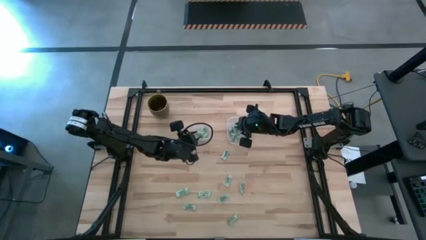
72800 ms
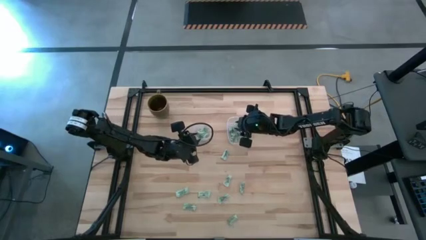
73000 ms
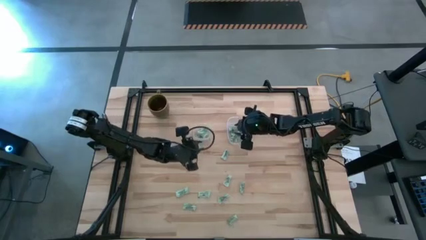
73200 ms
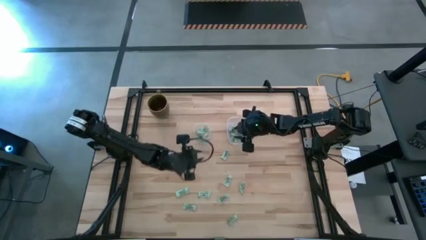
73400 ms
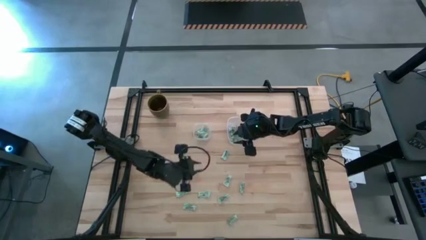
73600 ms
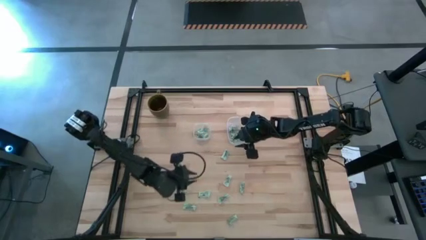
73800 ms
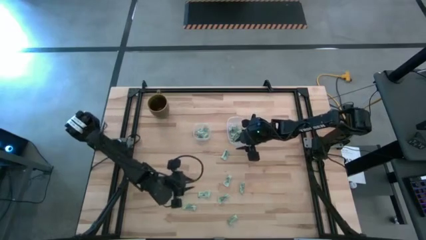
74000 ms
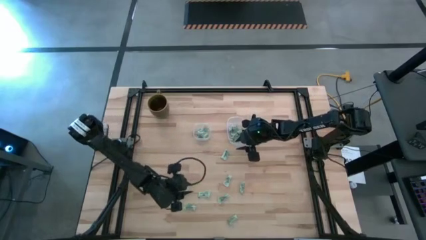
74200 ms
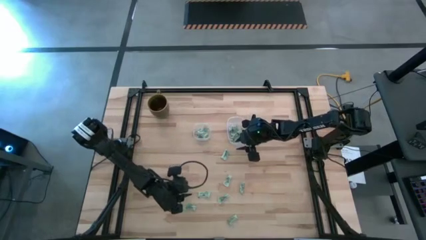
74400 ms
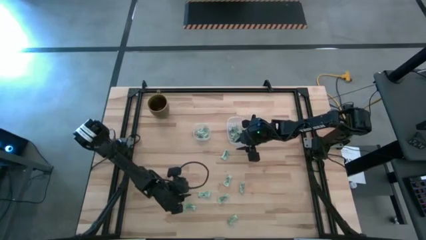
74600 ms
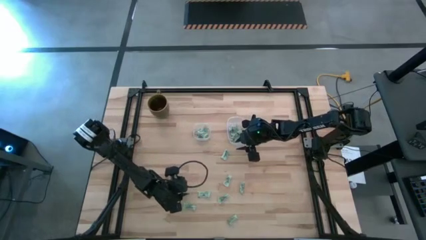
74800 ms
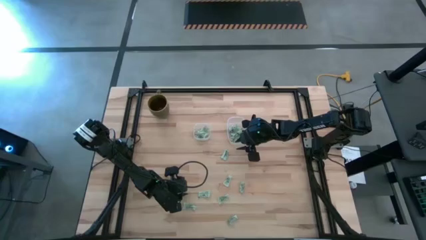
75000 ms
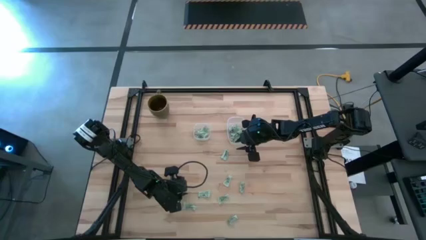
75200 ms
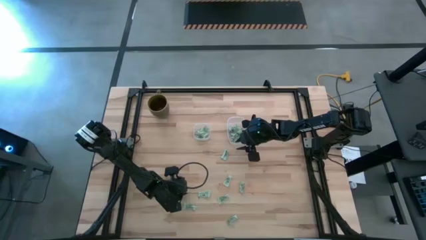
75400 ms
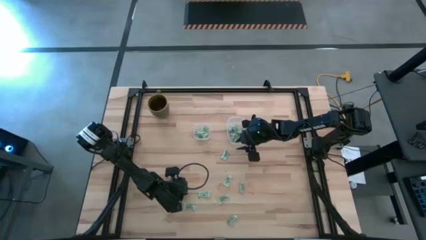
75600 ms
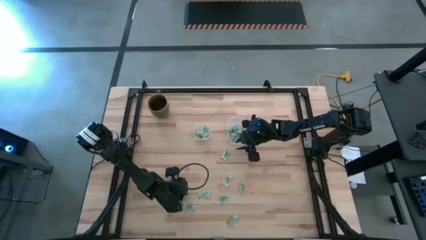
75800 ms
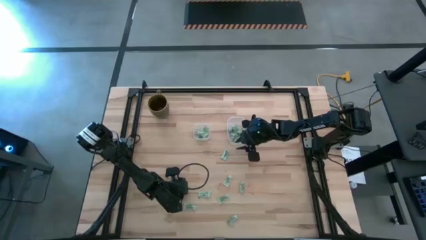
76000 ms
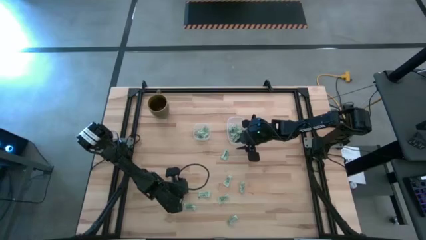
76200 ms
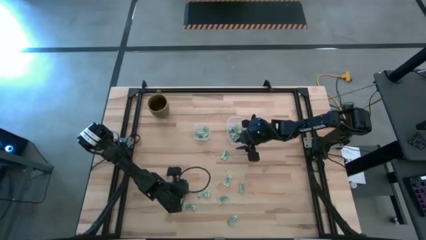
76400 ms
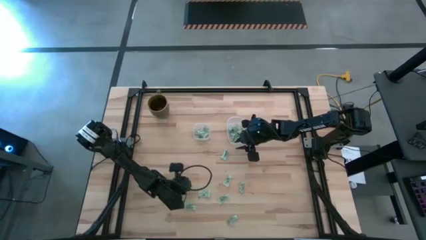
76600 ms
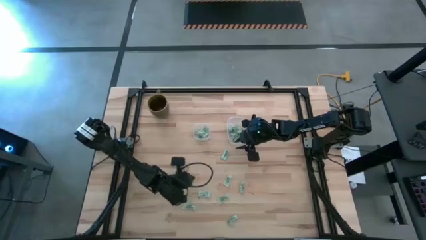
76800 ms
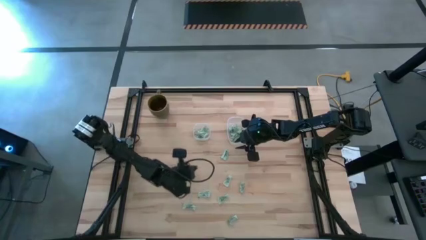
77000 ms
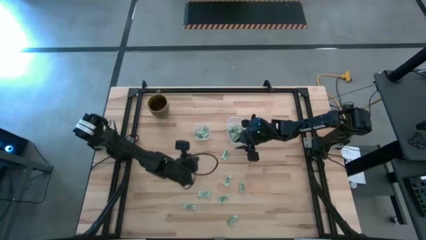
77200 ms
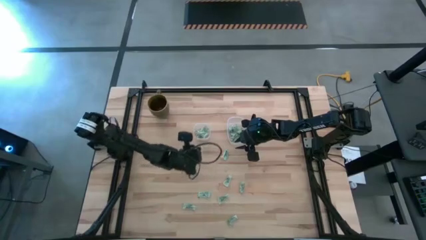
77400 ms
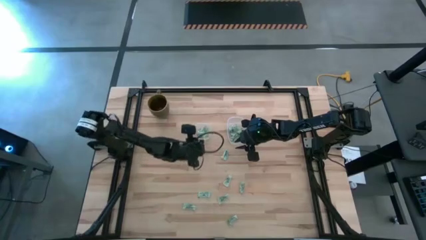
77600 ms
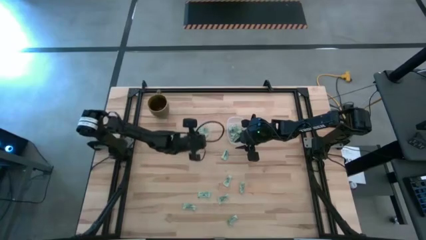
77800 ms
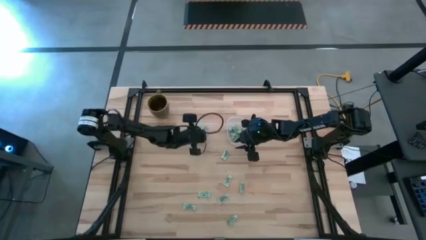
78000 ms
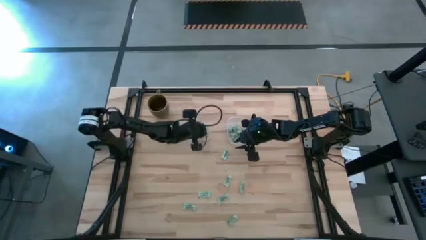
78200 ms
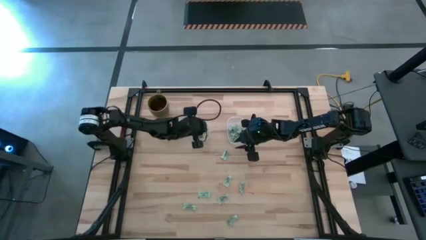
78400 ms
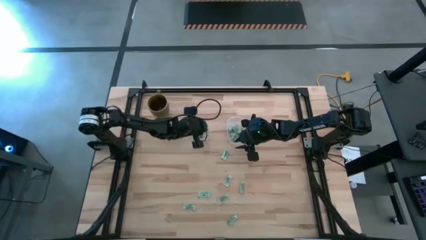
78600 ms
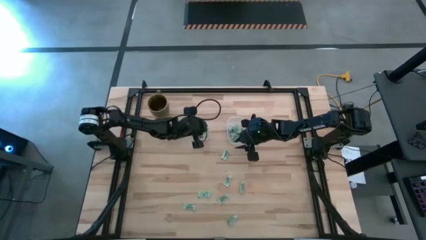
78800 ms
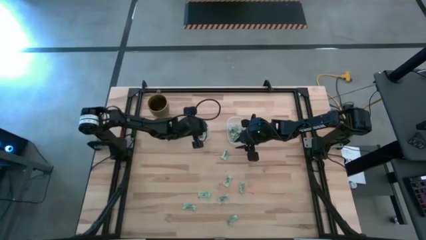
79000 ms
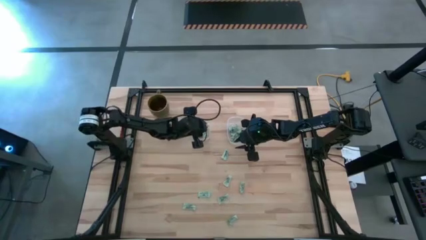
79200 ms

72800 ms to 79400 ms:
Task: Pick and place items into bin
Put the light green stevia packet into the left transparent bin

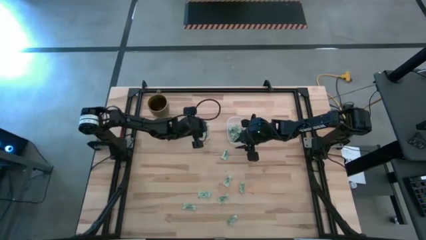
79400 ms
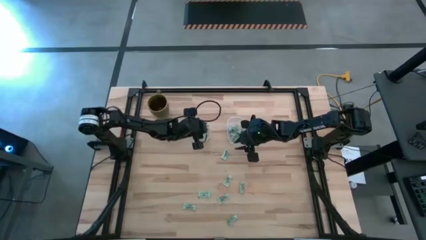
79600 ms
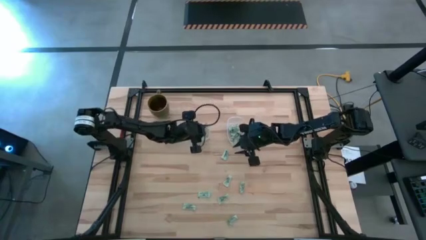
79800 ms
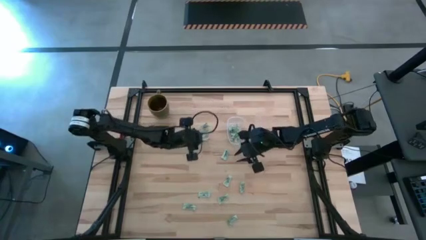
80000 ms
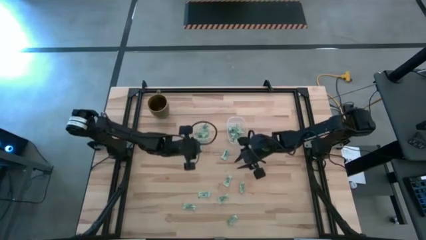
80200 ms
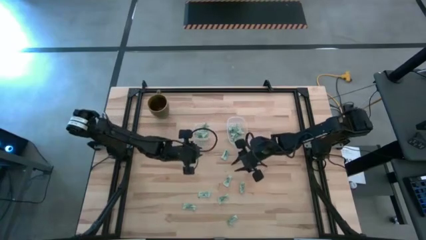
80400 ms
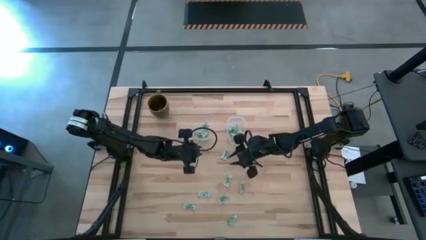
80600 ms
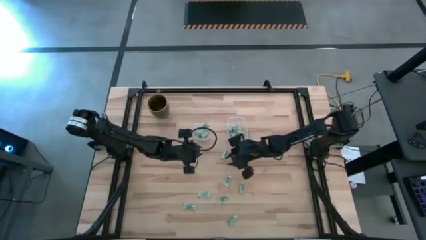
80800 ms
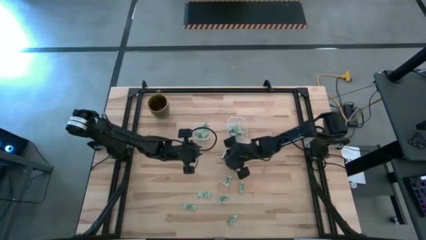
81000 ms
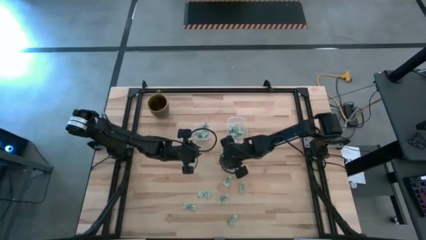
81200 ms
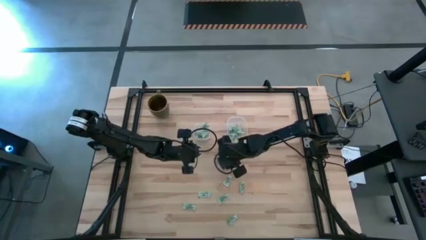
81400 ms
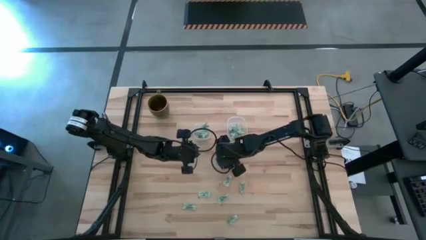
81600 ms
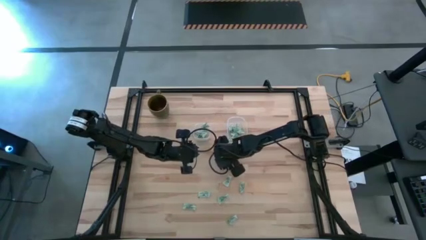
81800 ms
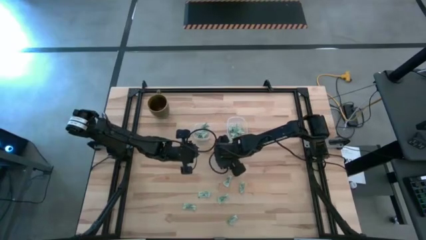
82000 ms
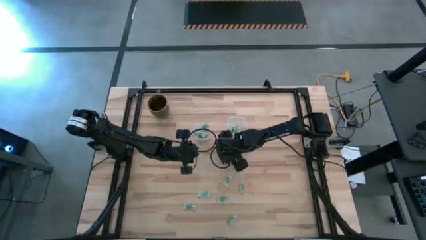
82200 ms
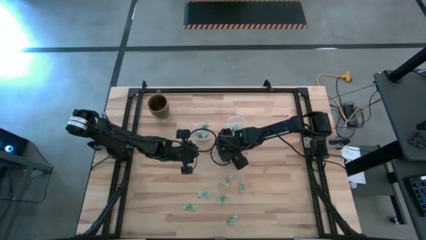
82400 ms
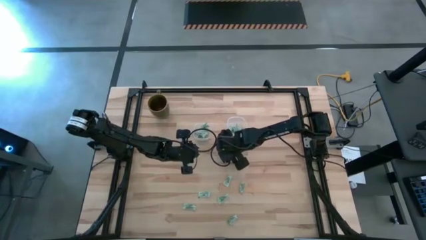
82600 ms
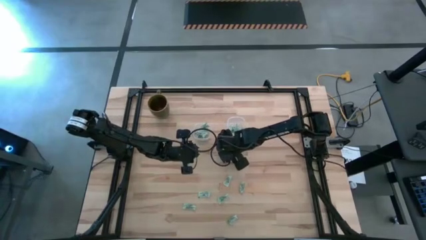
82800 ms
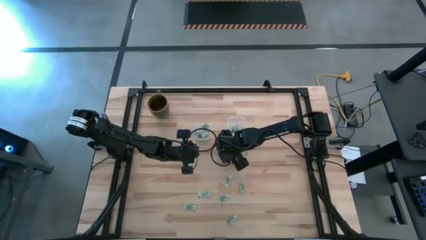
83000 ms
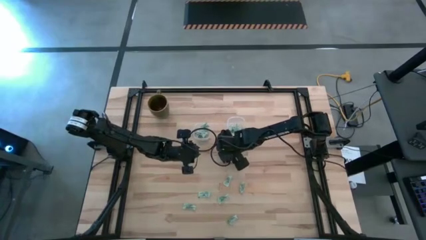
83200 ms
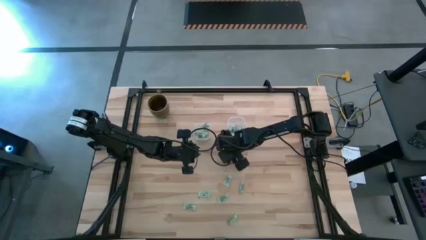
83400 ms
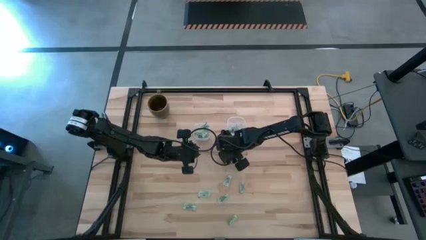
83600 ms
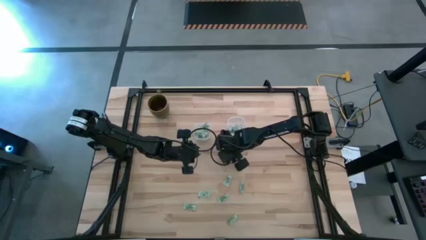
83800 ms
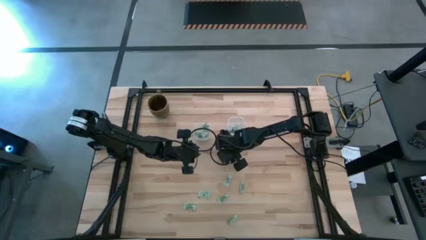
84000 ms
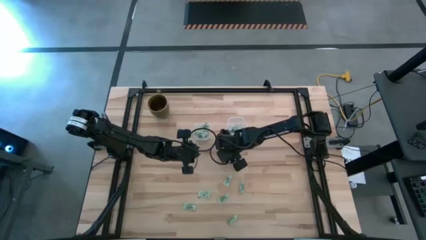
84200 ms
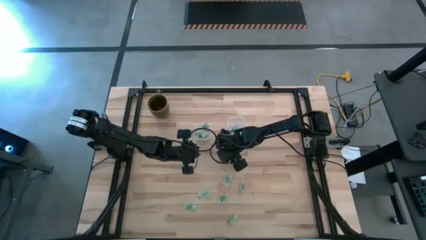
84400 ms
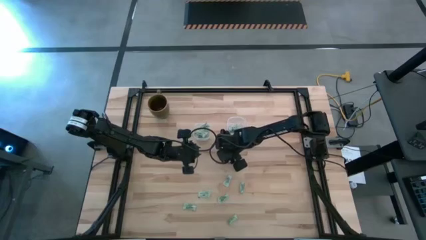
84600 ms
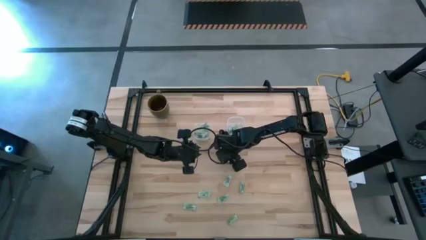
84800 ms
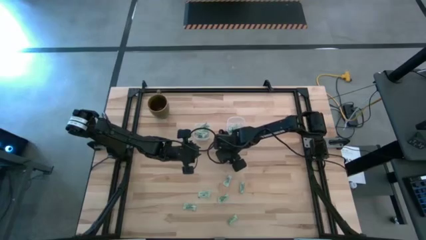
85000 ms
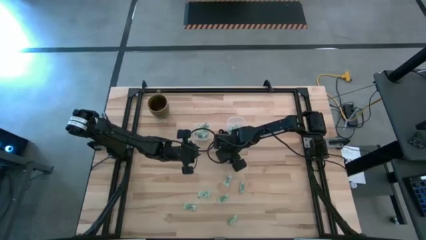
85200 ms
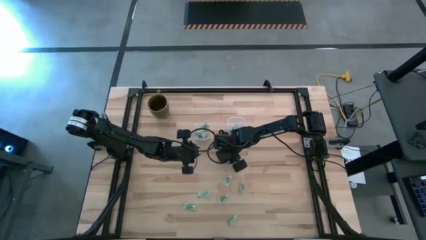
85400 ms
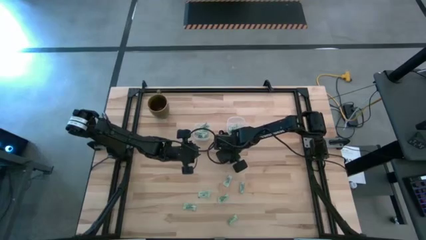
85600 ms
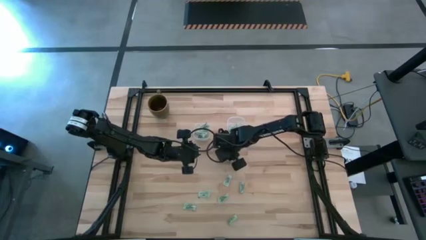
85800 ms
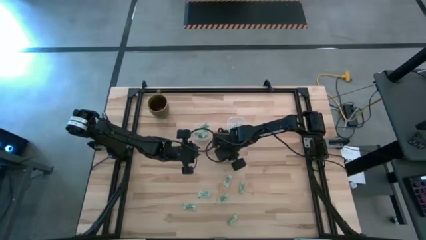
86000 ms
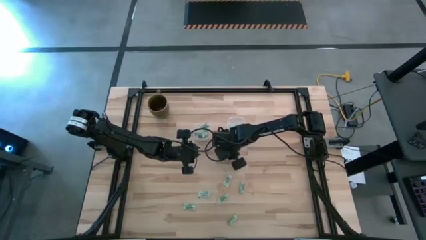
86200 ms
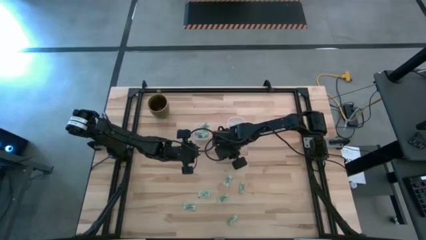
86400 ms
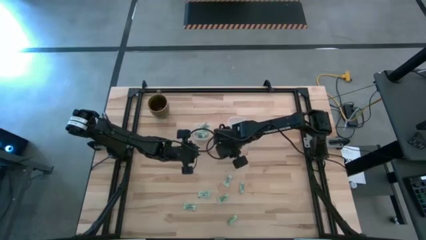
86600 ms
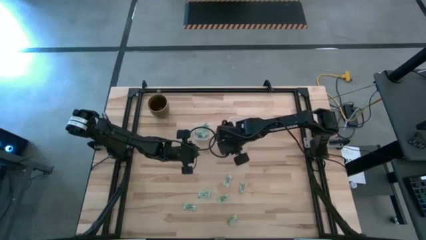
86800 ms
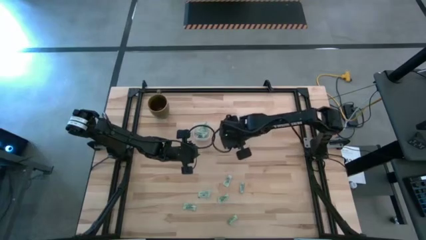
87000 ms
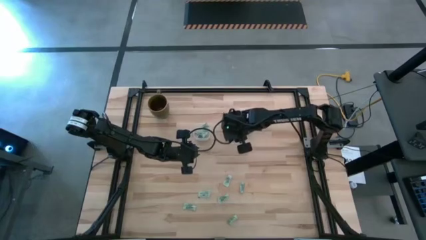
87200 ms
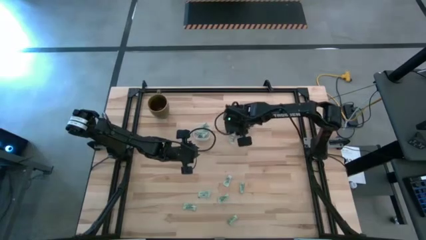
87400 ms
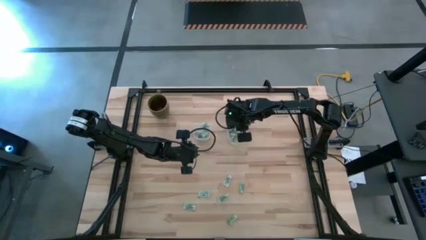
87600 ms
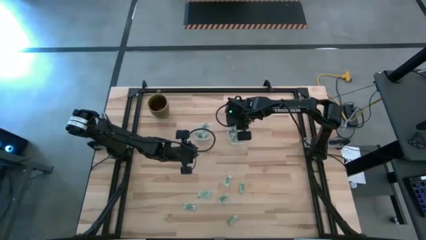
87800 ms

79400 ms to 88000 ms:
Put the light green stevia packet into the right transparent bin

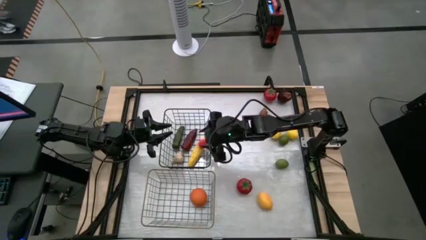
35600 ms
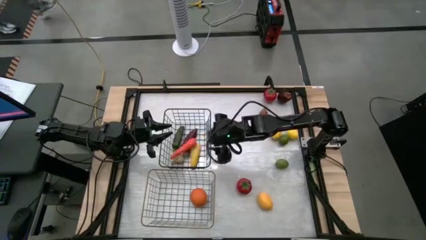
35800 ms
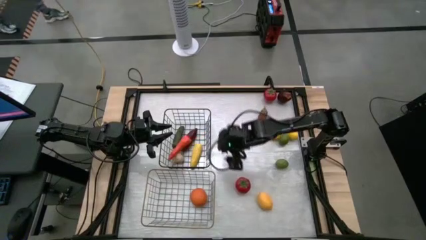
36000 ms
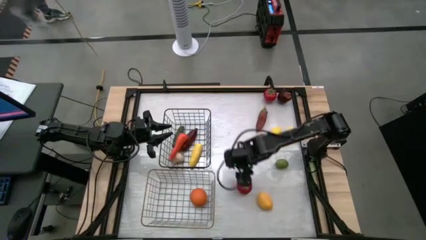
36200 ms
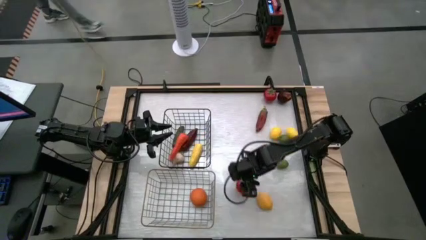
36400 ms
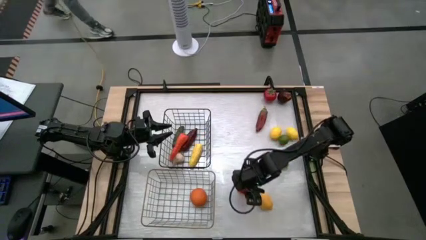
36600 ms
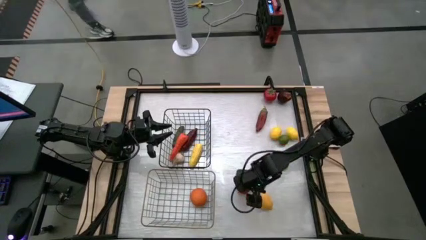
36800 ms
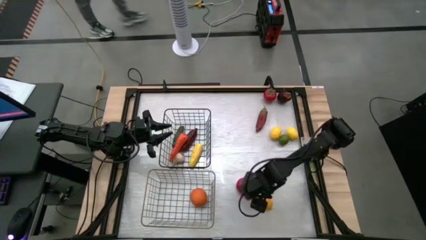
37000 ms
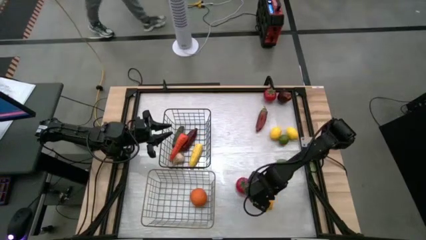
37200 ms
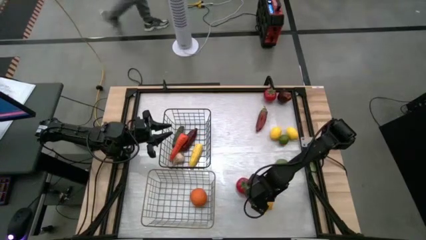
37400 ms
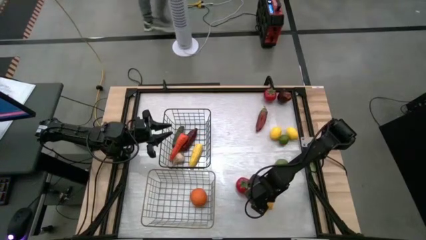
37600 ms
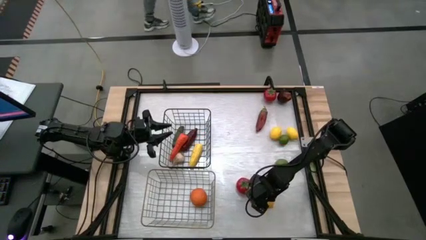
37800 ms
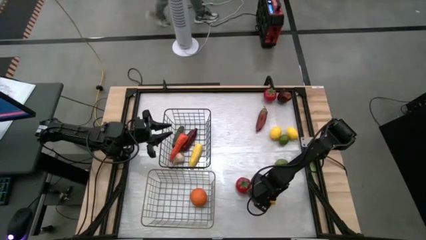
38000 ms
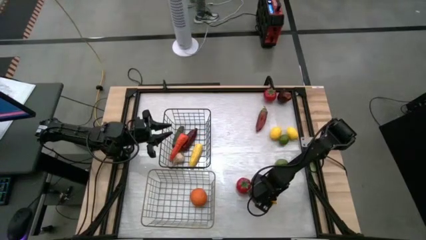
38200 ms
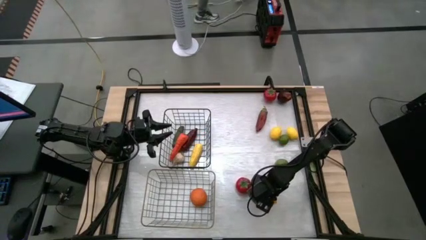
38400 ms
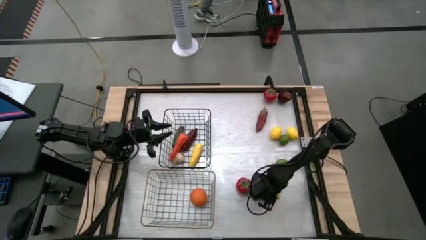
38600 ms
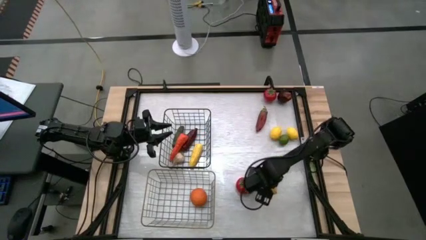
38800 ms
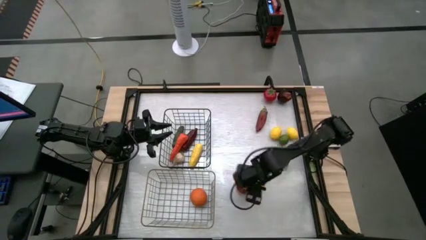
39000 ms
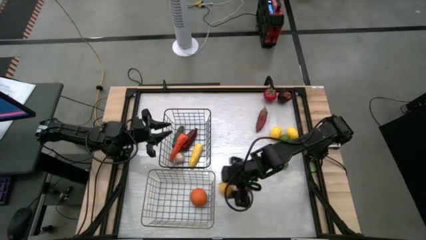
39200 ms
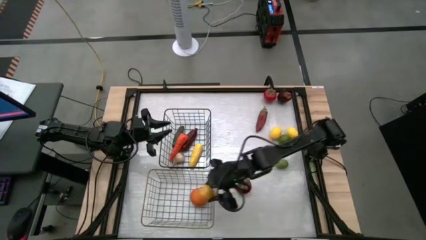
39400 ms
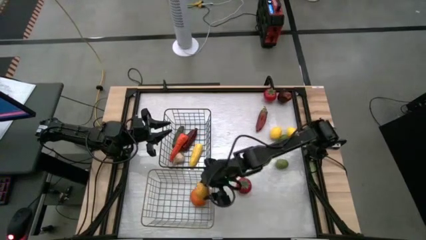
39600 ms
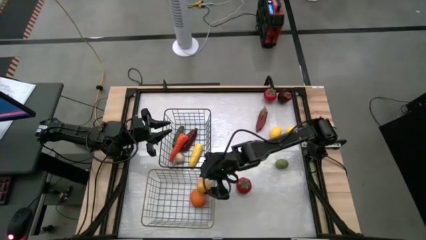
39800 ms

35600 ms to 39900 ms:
Task: Sort produce into baskets
Put the bottom left lemon into the wire basket
